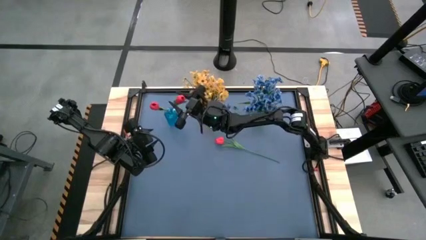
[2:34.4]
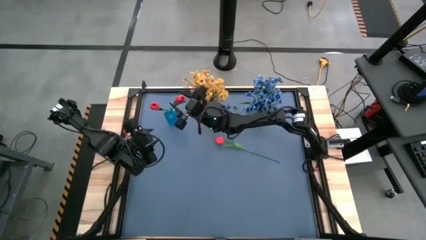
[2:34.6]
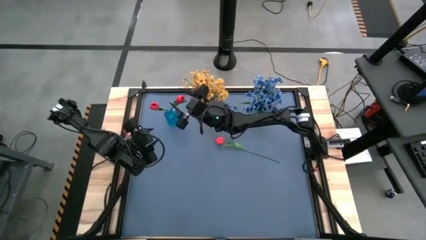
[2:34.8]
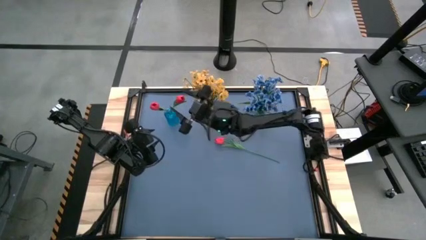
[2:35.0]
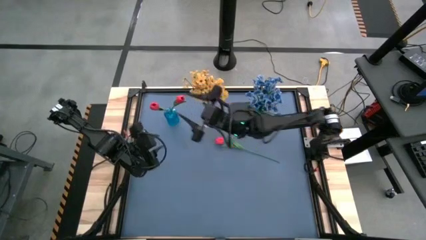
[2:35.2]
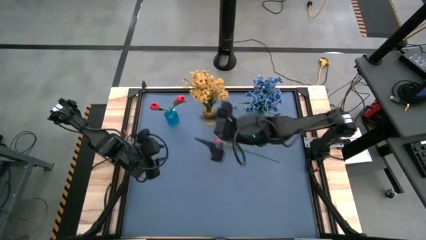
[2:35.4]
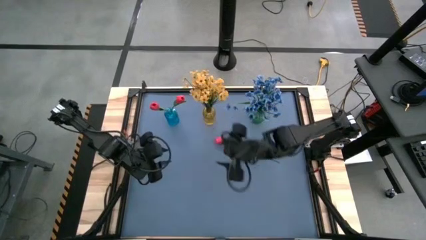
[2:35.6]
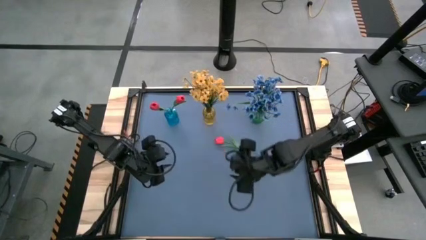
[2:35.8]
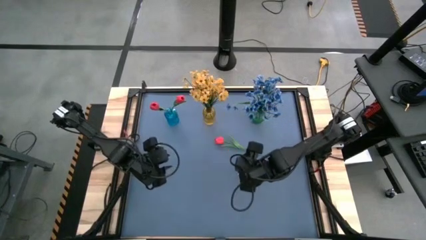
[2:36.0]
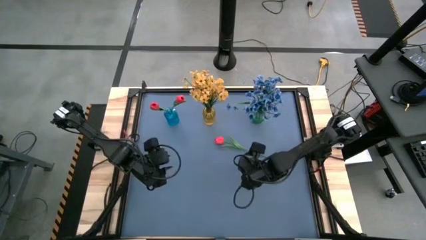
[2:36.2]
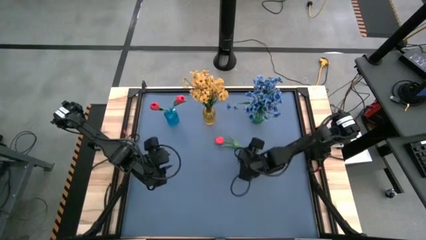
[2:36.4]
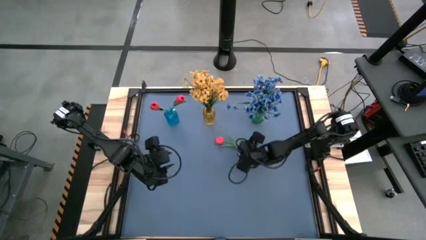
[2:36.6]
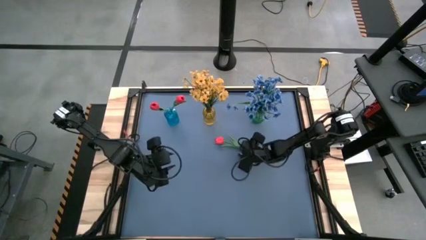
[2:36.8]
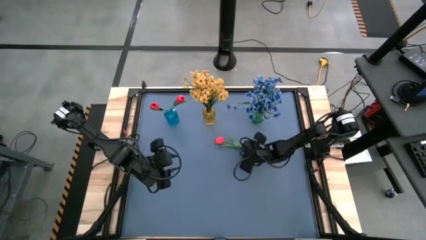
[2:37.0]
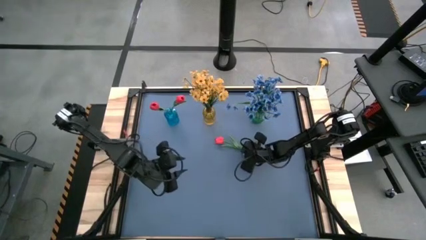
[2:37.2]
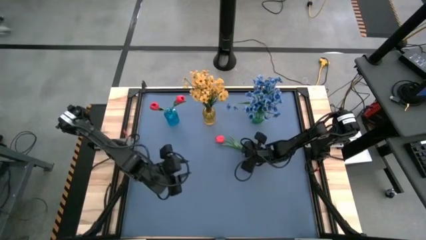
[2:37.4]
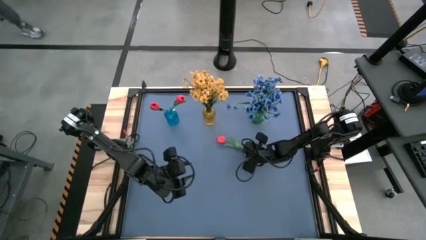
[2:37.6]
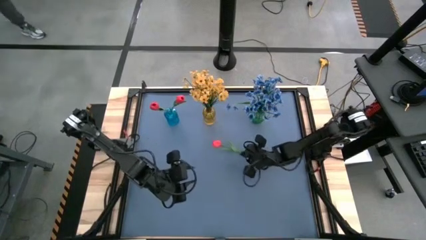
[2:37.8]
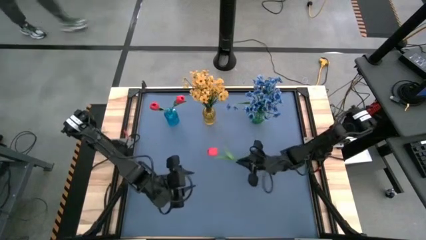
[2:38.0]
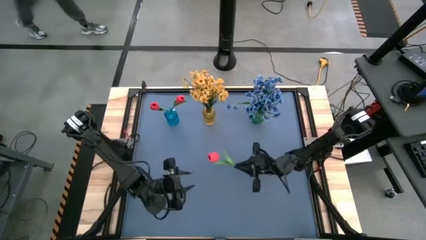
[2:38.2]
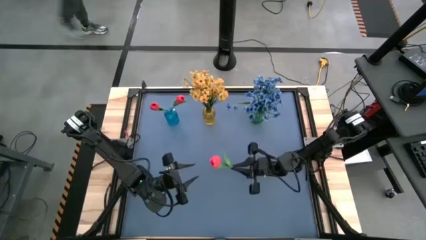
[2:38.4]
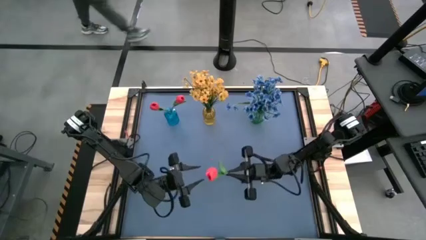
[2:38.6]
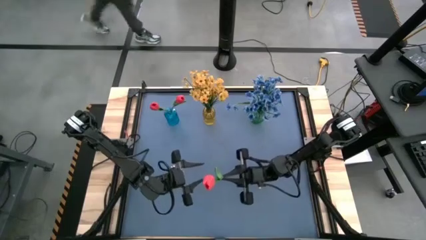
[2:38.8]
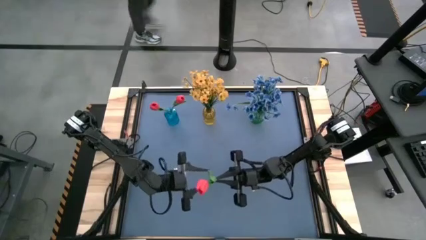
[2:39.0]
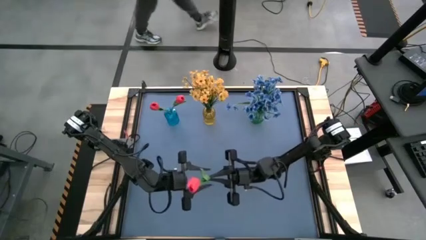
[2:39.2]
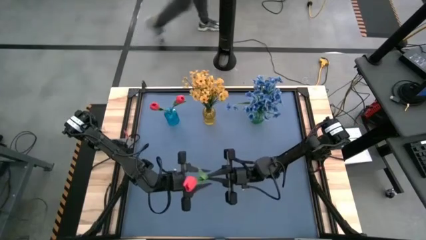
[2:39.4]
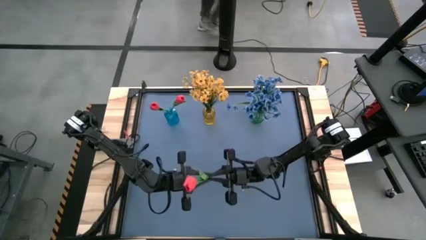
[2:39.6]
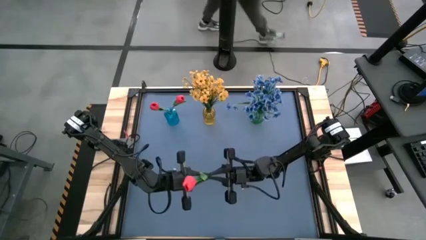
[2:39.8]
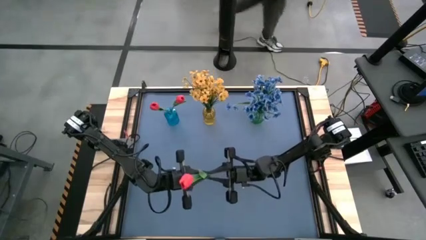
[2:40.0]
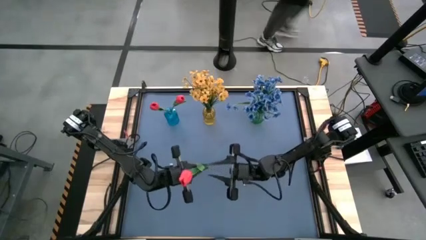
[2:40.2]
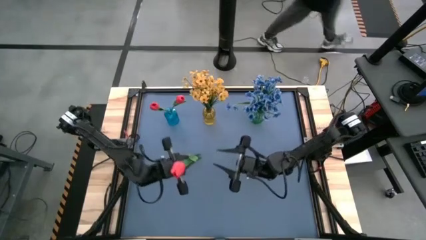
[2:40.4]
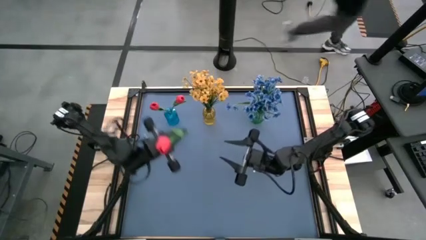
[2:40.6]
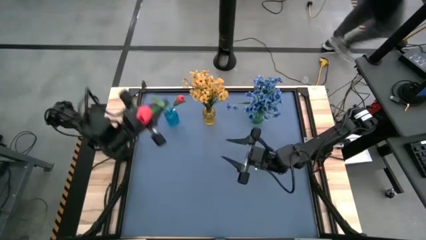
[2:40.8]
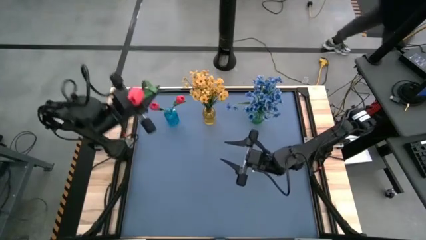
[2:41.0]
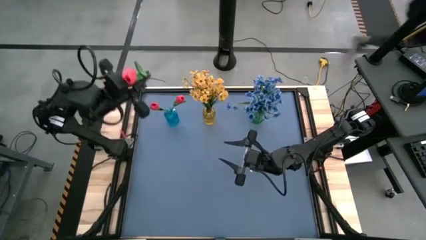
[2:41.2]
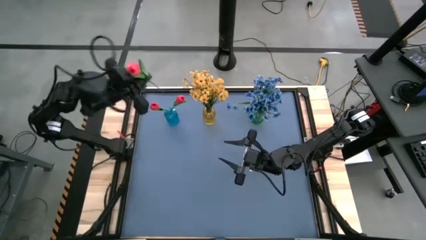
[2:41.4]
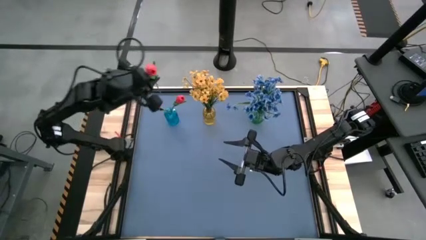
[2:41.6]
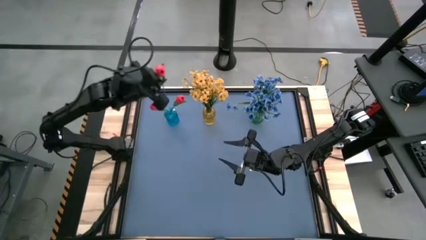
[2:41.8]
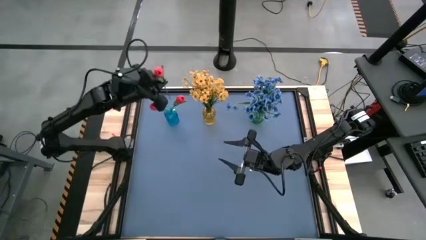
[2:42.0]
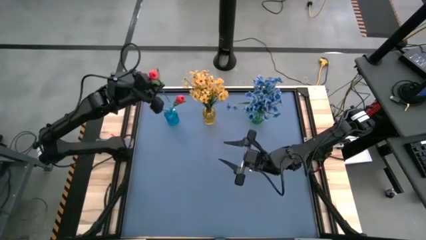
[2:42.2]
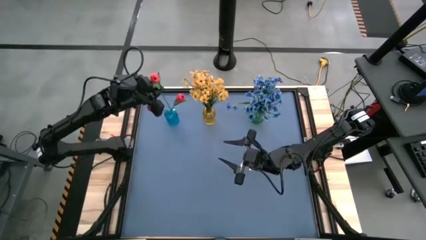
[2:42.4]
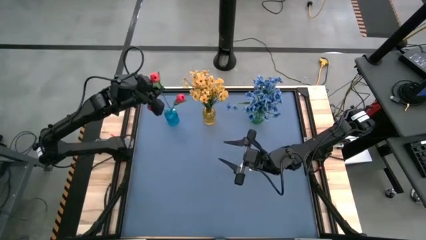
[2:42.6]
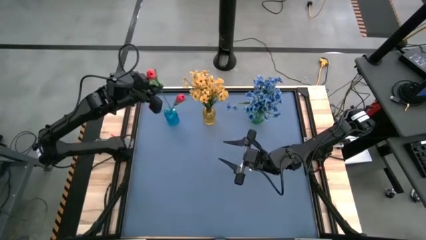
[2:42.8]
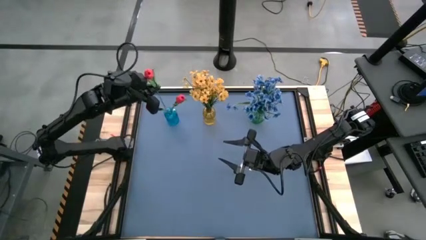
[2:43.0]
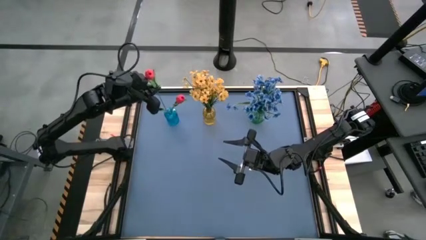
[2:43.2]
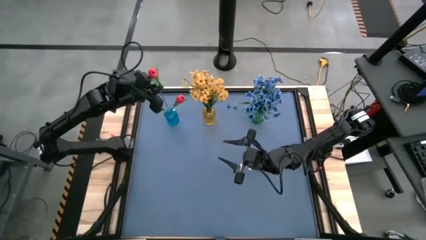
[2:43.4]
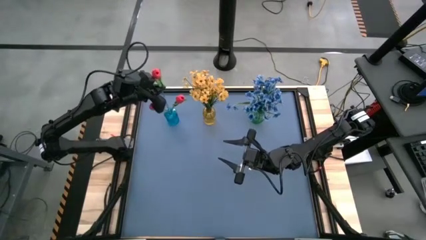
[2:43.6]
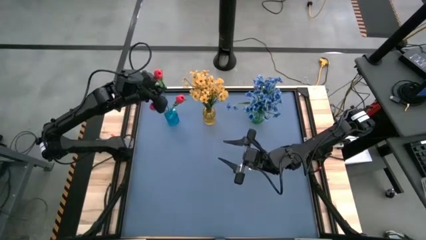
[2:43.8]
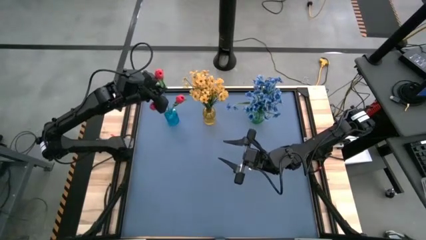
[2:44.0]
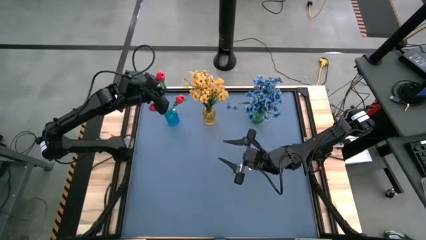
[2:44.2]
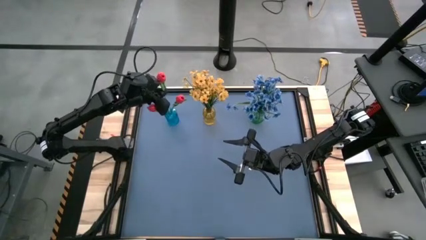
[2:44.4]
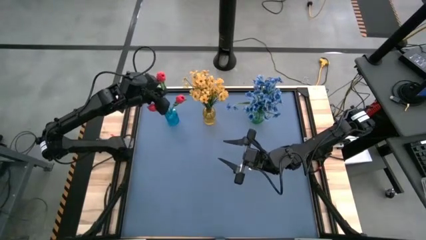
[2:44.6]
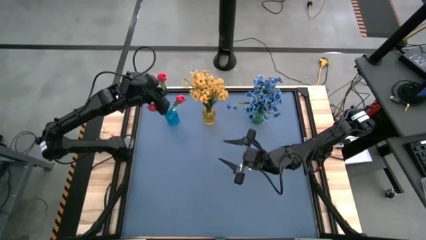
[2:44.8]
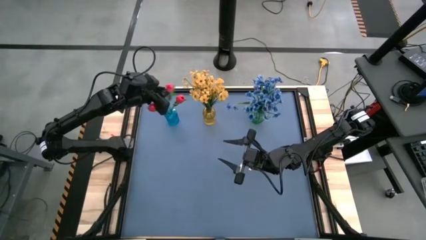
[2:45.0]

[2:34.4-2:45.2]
Task: Sort flowers into vase by color
Put the red tulip into the blue vase
